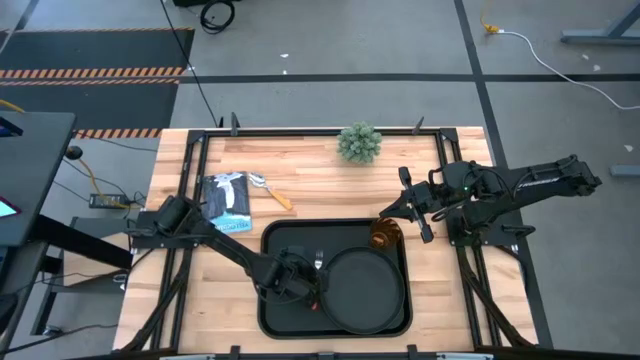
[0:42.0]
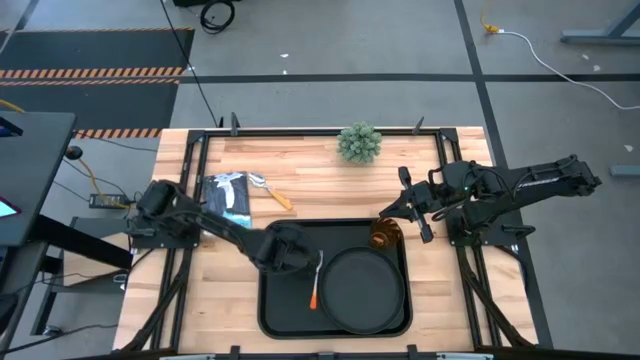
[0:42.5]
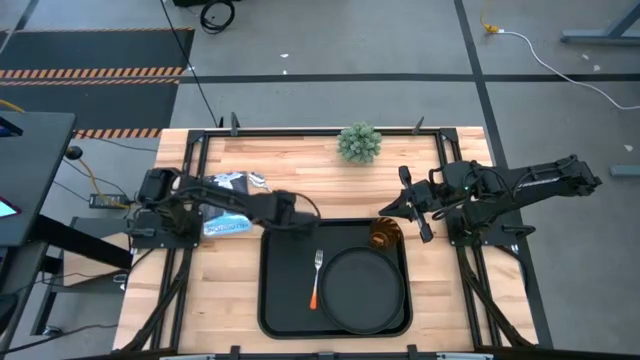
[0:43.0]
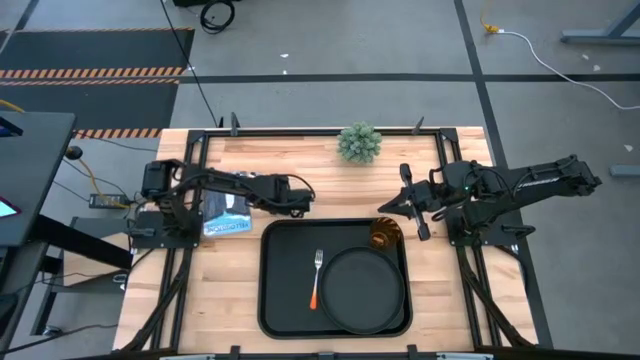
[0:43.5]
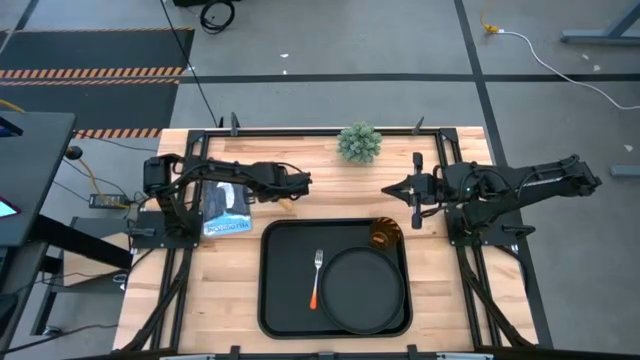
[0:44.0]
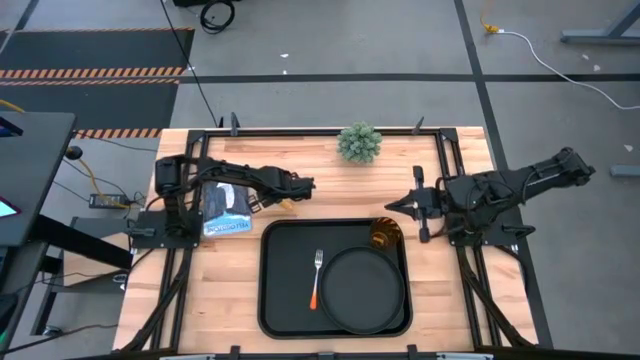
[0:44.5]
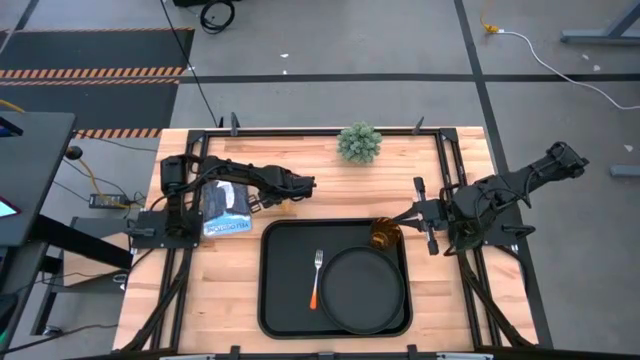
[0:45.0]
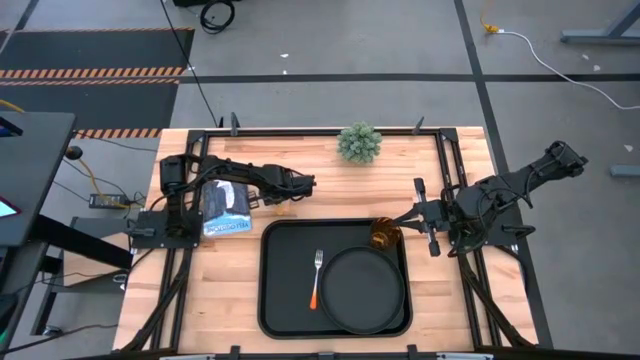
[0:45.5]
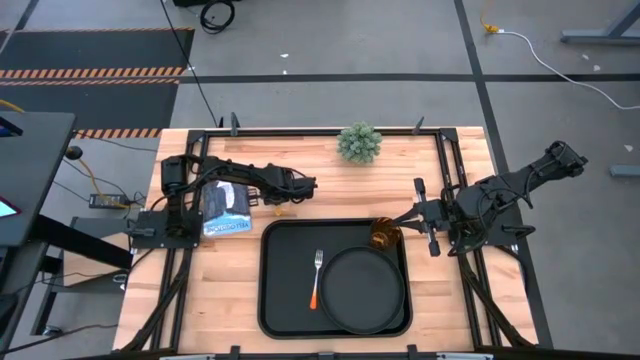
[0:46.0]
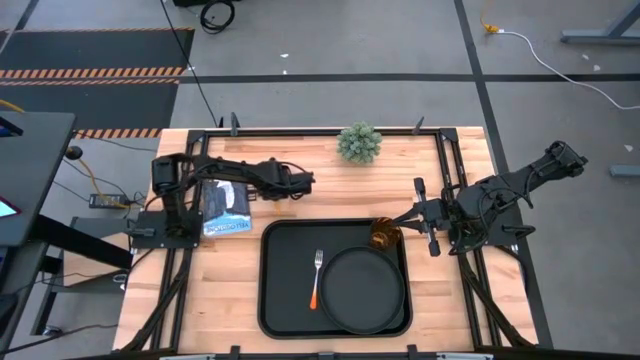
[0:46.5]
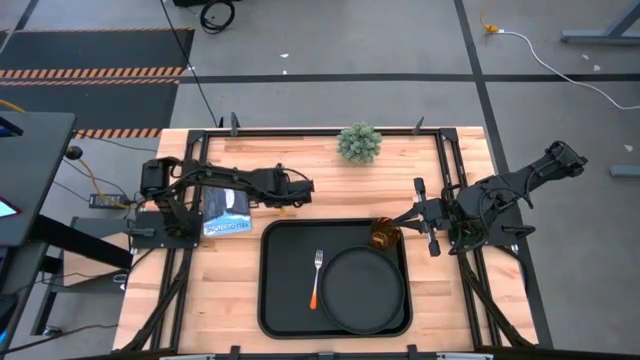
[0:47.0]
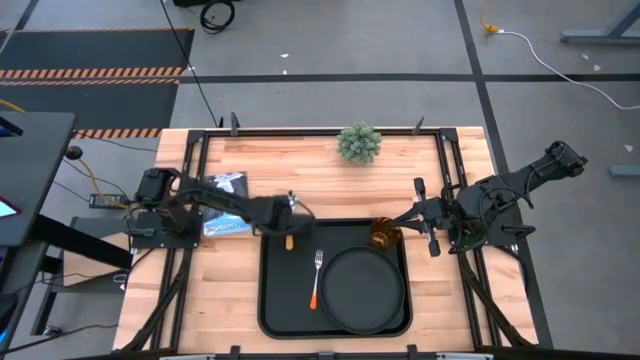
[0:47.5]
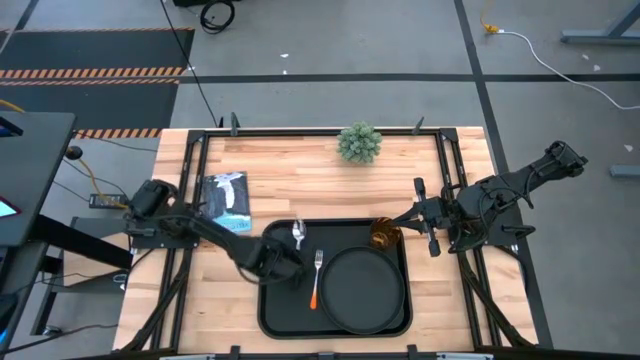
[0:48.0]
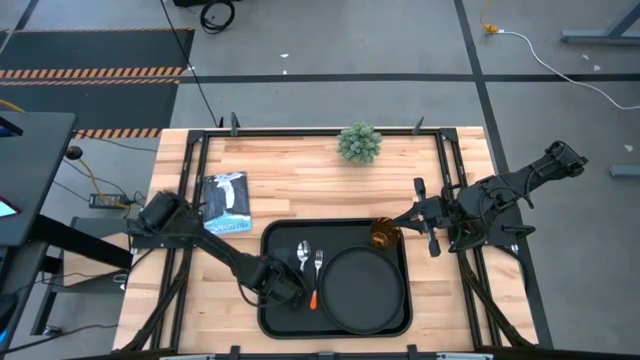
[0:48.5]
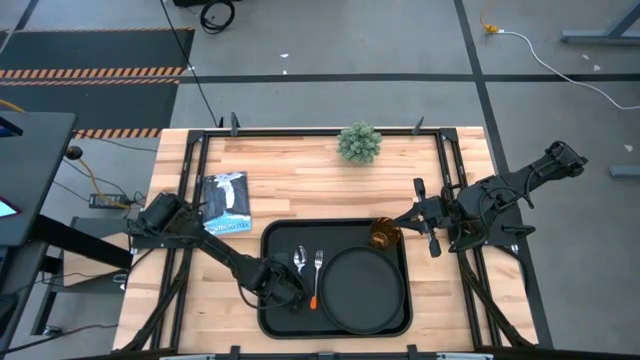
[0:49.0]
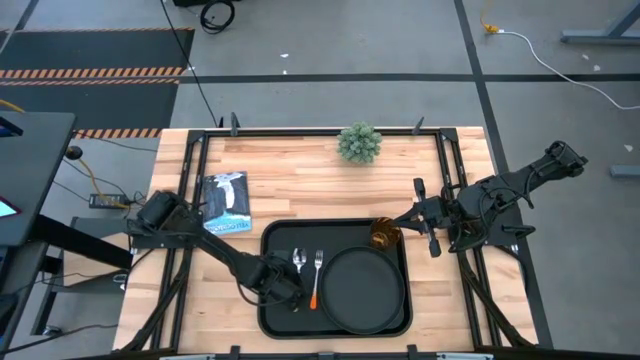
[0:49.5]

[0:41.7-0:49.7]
Task: Pick and place plate/cup/fork/spoon on tray
Put the yellow spoon to the left of the orange fork on the black tray

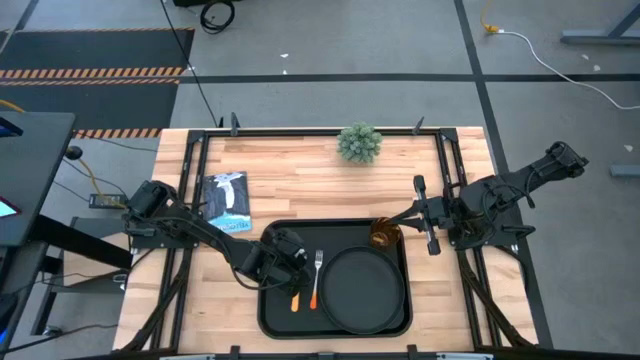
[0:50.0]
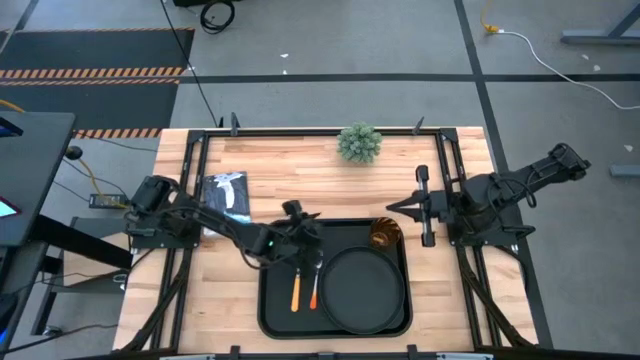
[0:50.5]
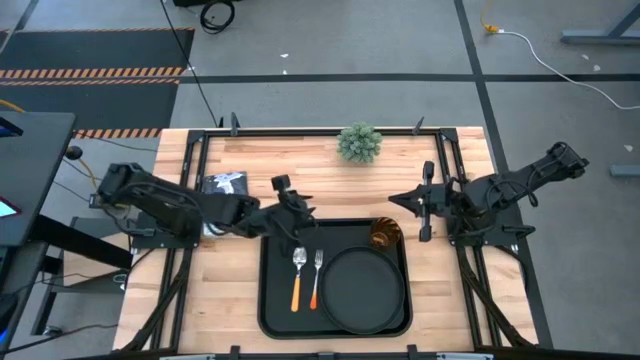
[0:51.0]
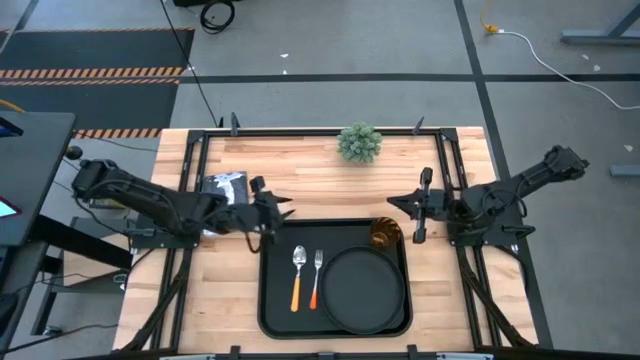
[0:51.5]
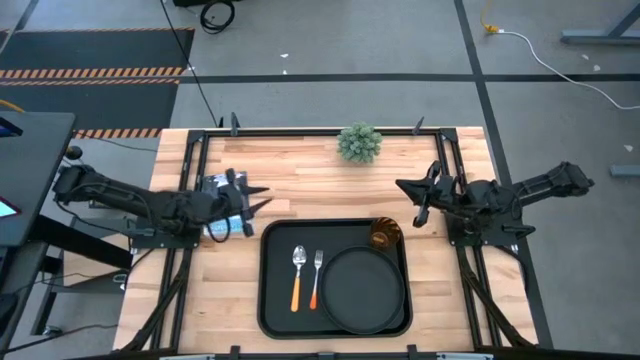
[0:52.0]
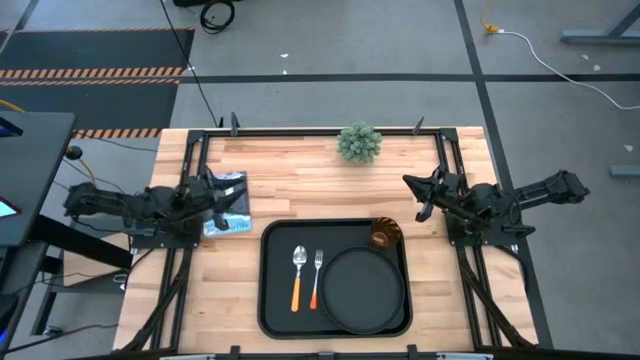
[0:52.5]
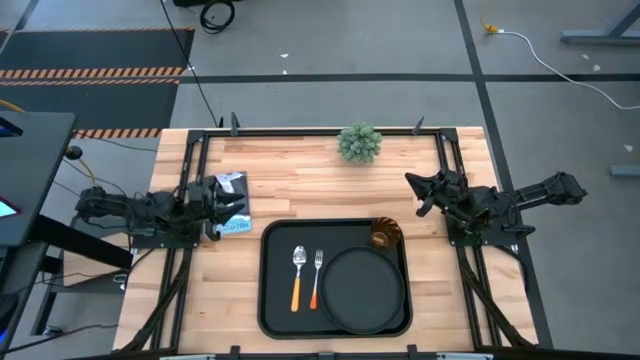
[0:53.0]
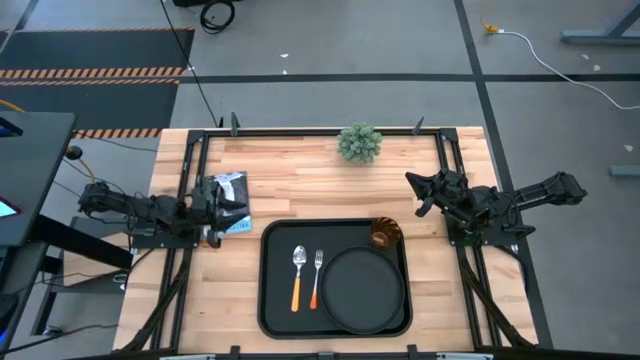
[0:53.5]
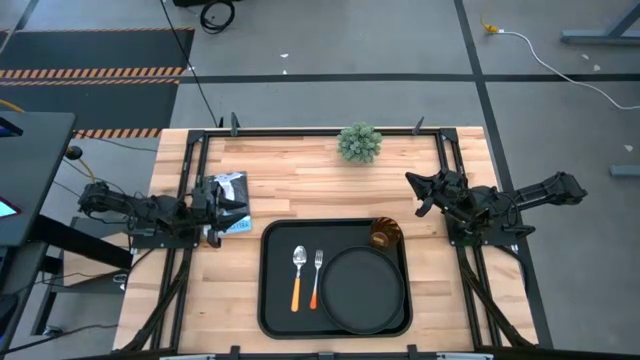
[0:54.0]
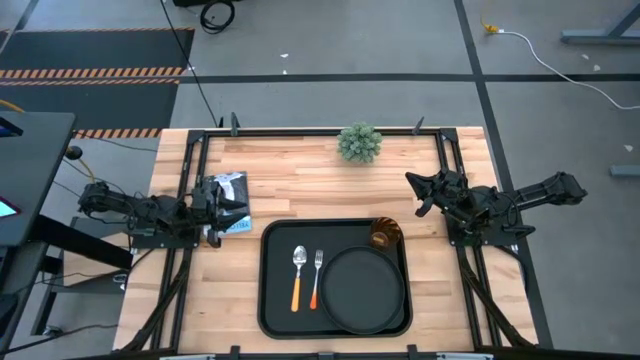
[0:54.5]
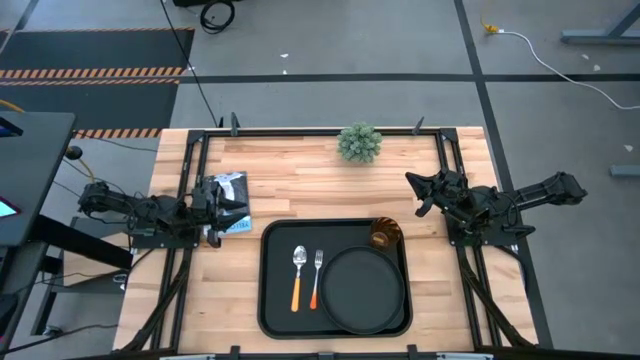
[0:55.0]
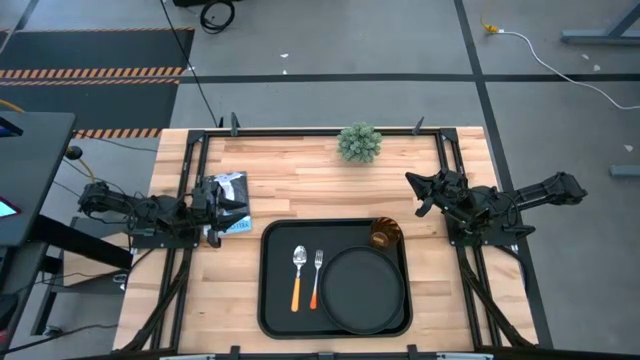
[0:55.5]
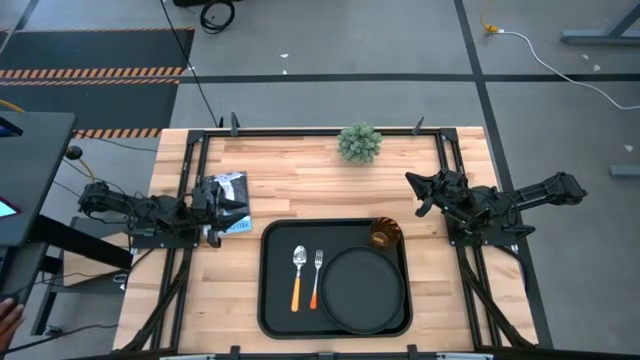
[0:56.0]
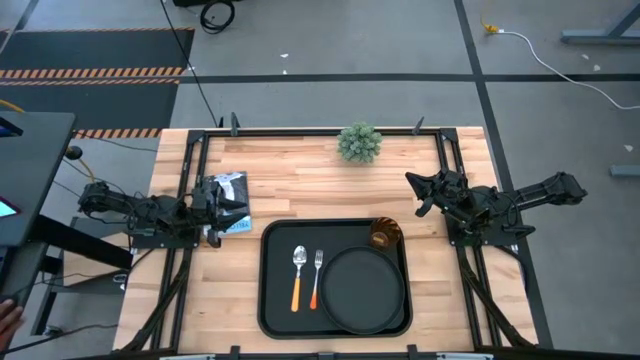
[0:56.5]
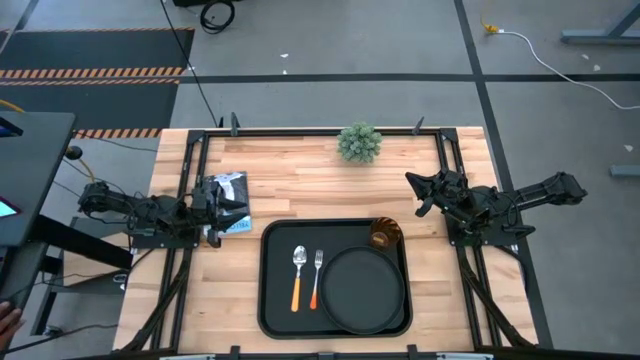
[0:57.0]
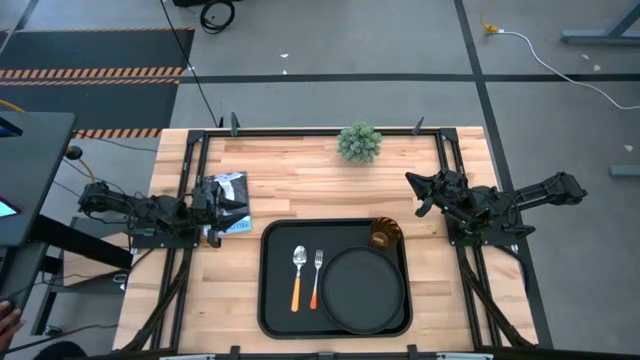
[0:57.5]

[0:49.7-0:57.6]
Return to Home Position

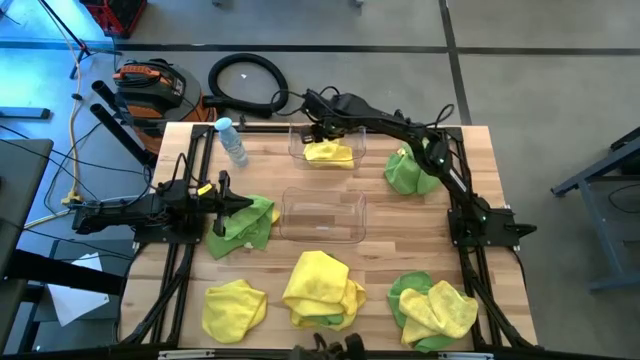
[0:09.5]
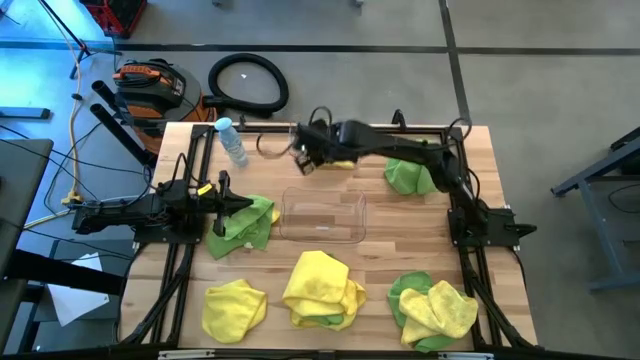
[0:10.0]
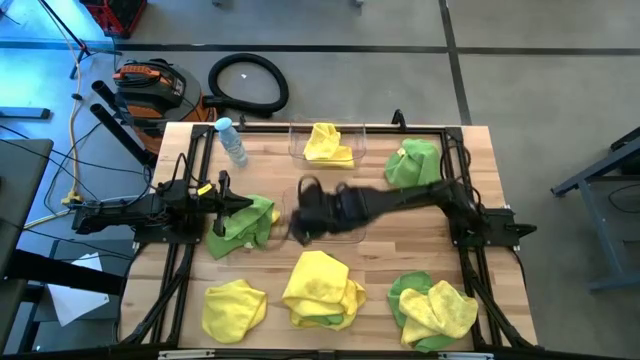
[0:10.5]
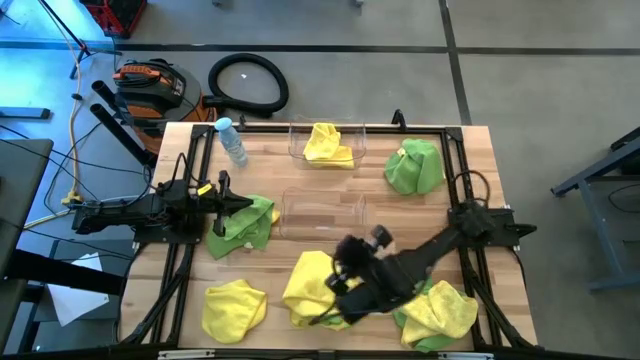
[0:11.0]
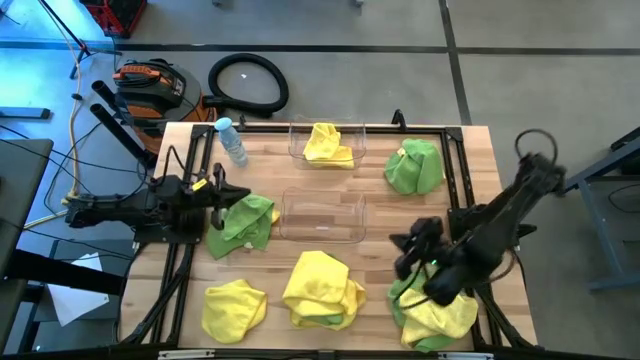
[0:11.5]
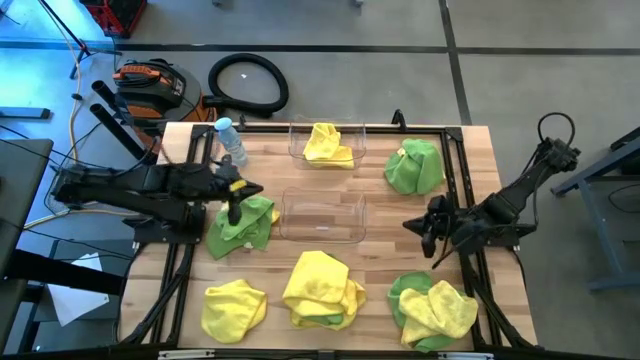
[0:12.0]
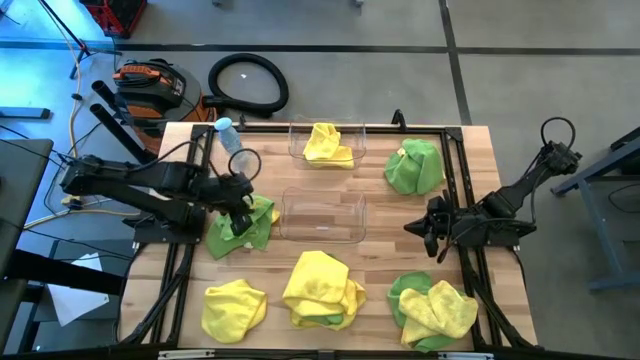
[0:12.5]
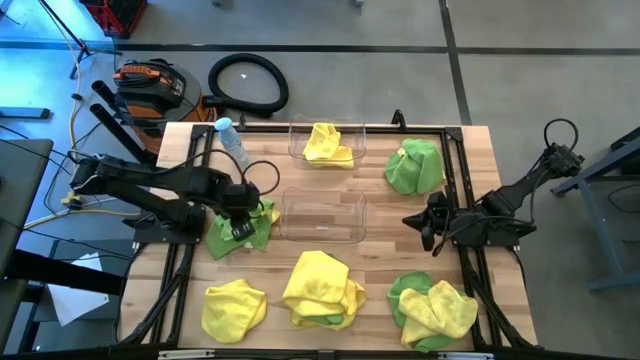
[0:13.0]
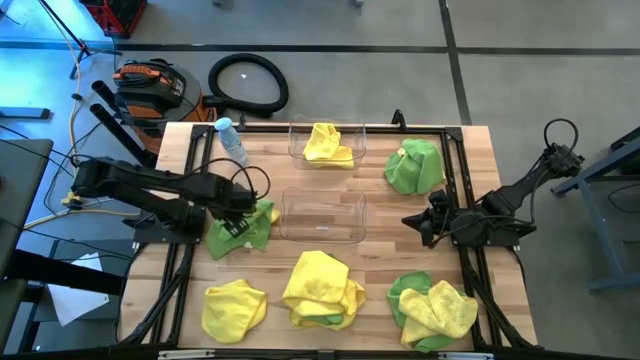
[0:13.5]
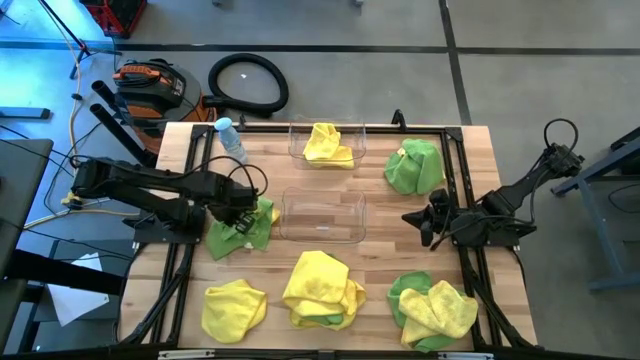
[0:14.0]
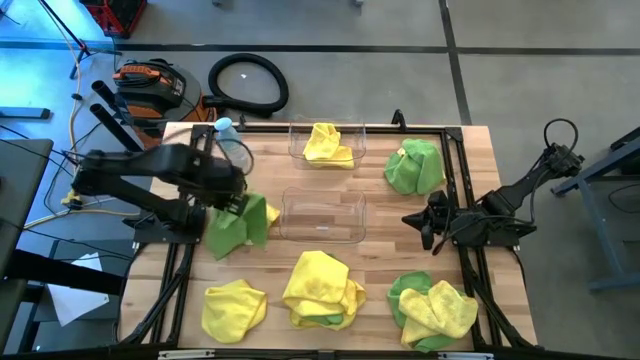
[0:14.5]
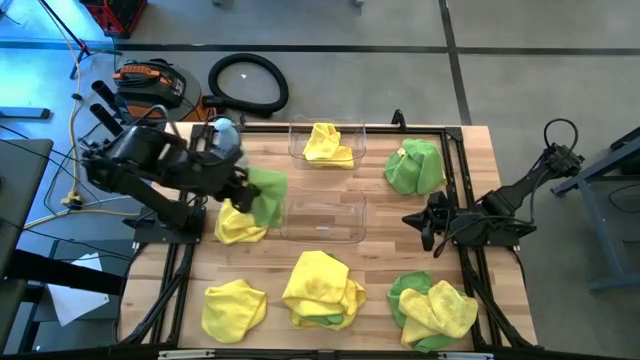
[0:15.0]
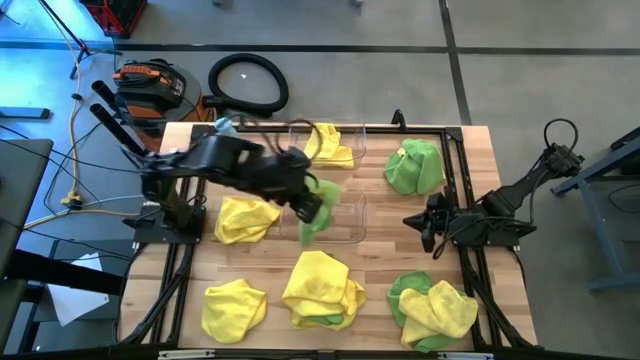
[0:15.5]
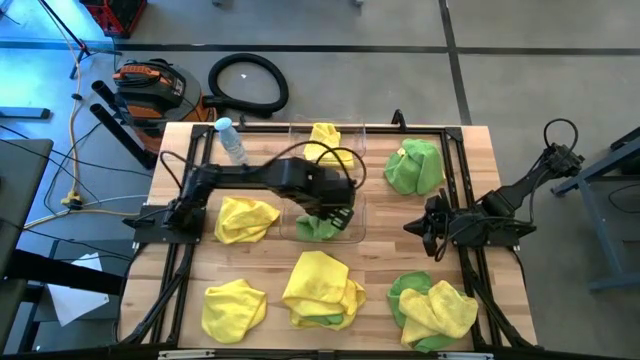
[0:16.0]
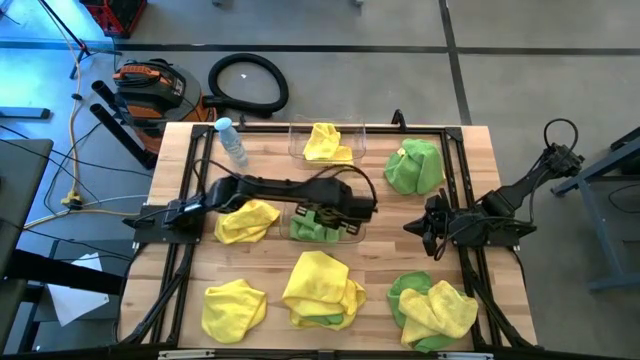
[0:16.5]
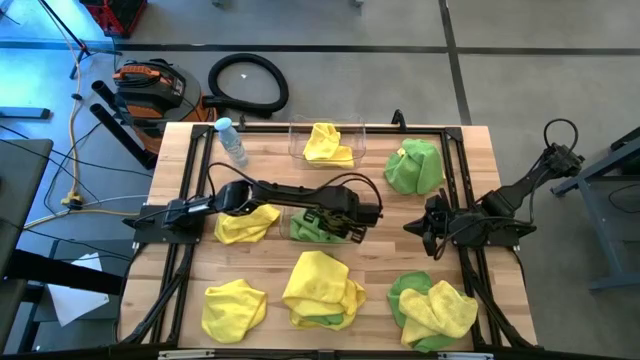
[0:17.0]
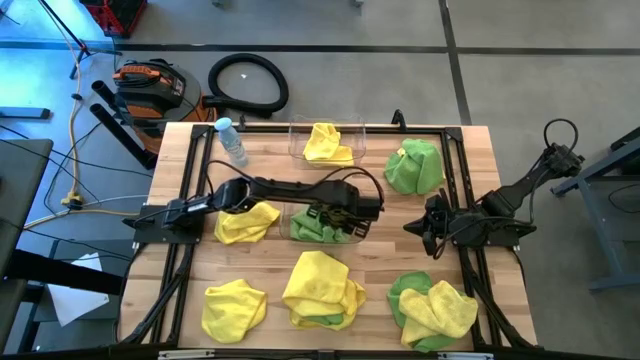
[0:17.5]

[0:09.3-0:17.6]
Task: Sort microfiber towel by color & place in baskets
Put the green towel into the bottom transparent bin
